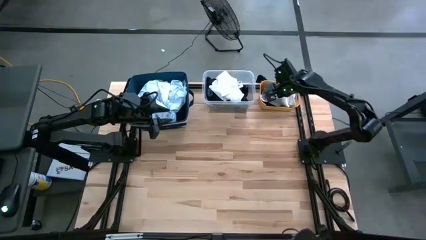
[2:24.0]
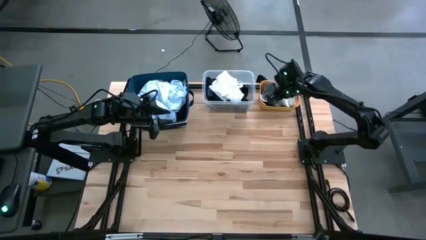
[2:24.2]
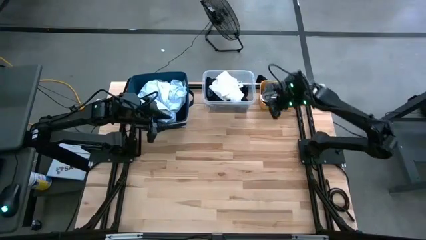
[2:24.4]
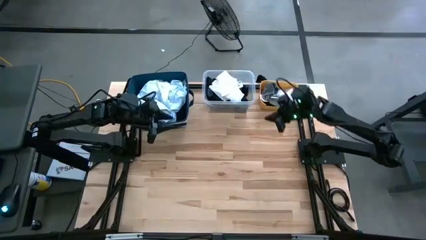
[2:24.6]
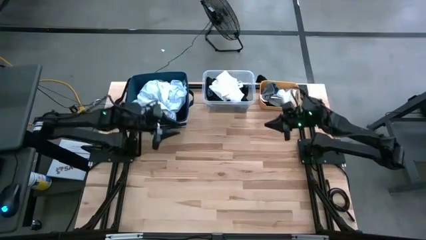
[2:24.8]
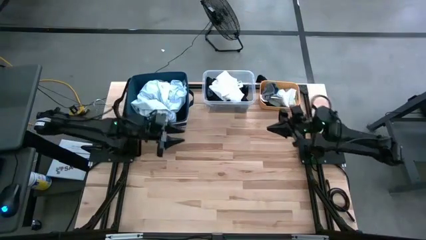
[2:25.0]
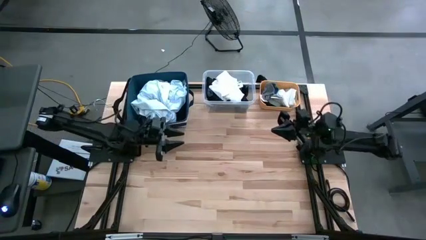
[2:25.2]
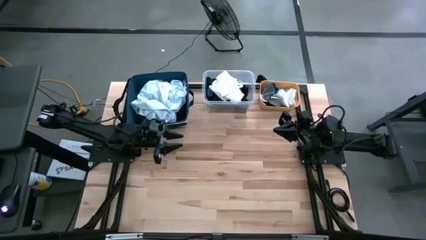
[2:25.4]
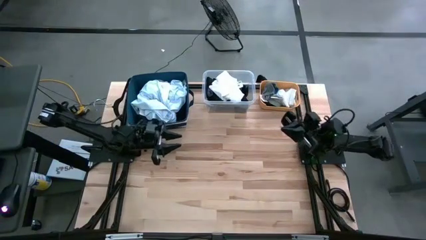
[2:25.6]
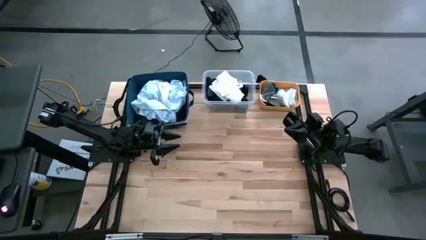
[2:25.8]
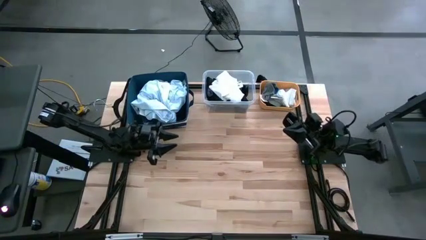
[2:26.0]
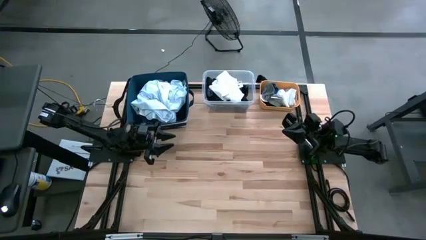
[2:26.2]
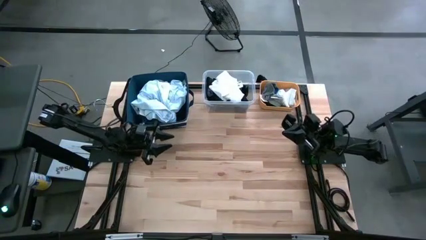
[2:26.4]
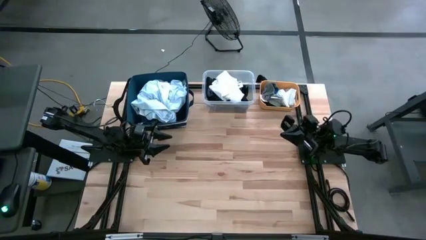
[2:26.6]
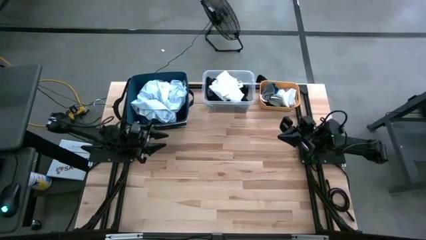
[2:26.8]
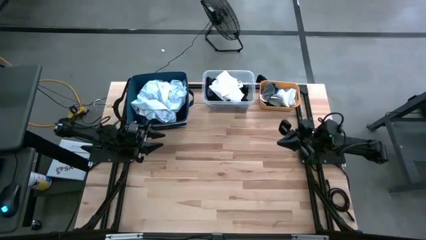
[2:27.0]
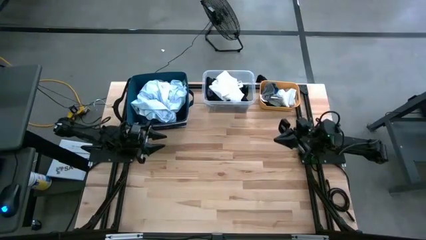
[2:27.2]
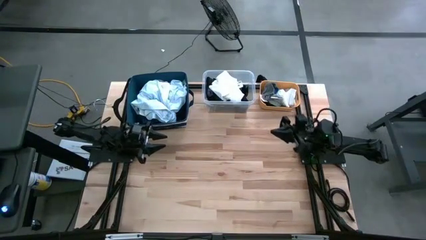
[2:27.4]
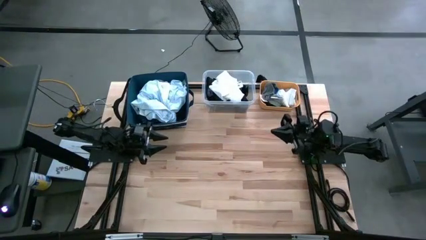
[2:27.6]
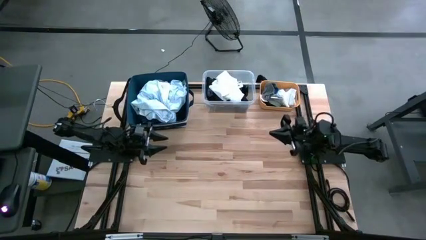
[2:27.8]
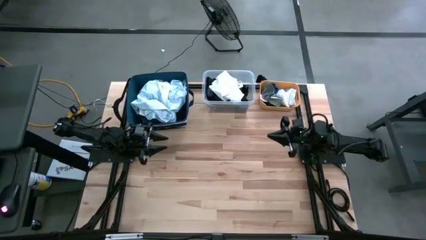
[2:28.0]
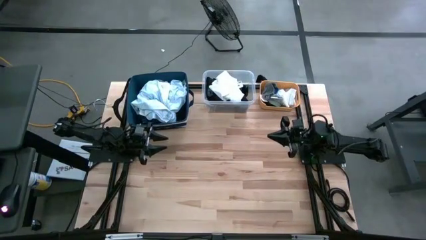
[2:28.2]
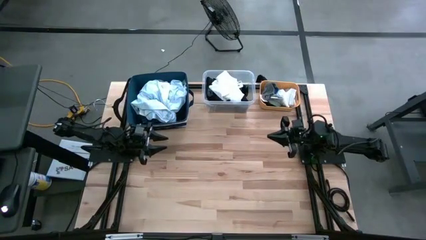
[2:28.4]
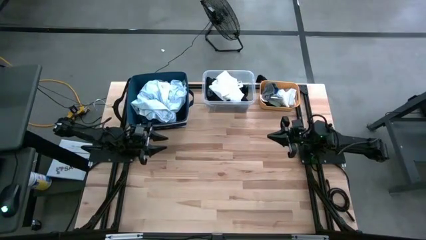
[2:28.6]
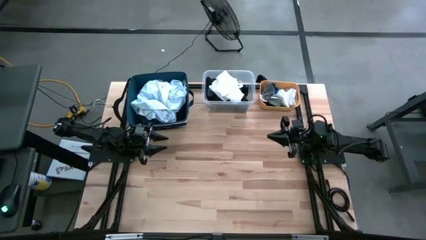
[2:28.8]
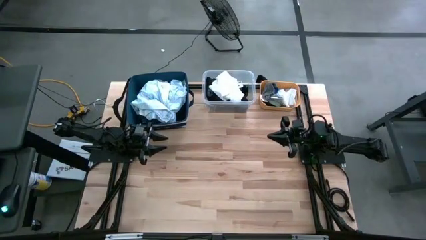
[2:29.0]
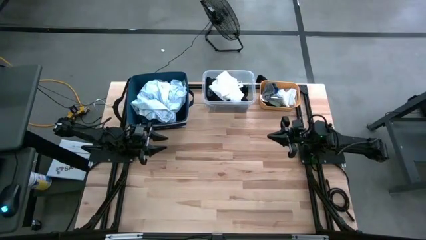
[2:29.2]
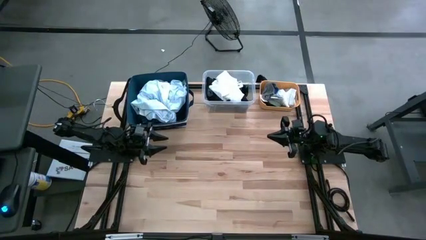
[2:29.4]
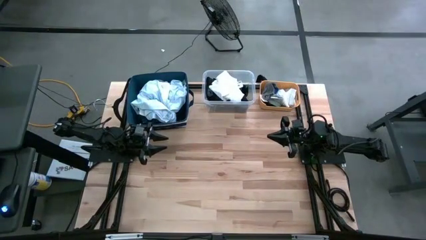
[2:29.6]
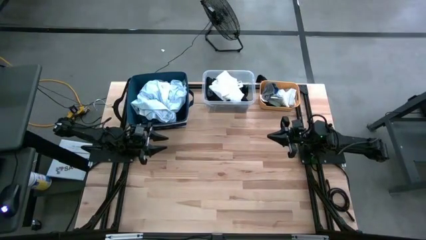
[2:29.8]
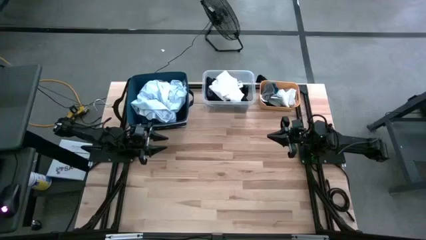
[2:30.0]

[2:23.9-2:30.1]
Task: Pick & Place Cloths
Return to Home Position

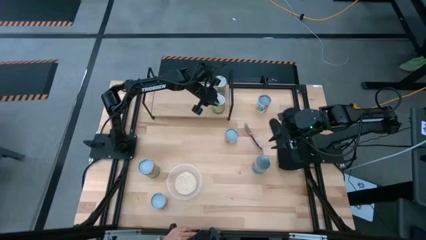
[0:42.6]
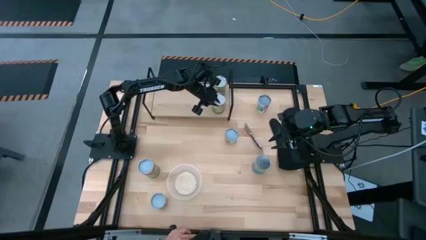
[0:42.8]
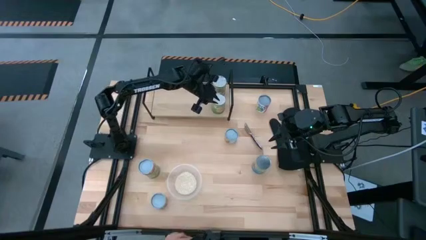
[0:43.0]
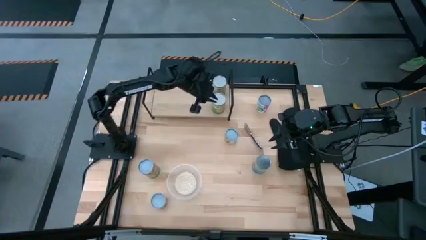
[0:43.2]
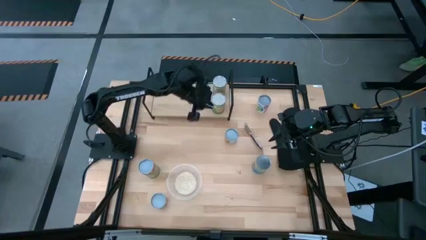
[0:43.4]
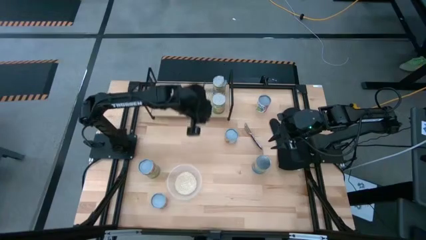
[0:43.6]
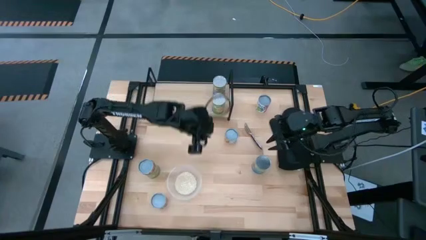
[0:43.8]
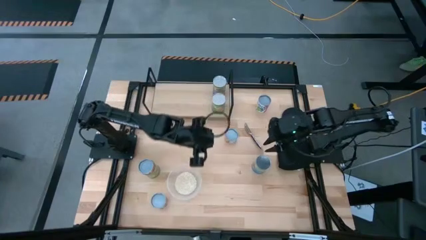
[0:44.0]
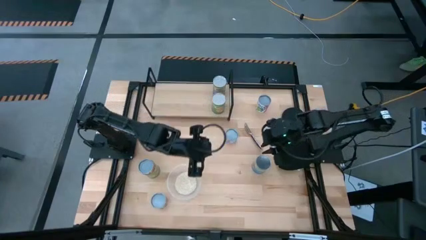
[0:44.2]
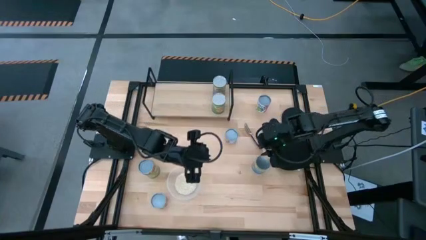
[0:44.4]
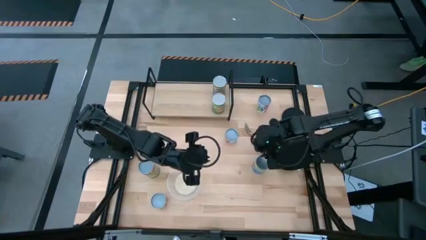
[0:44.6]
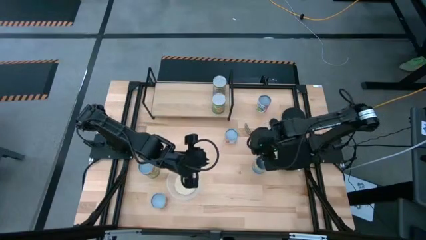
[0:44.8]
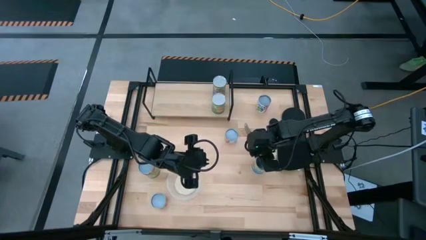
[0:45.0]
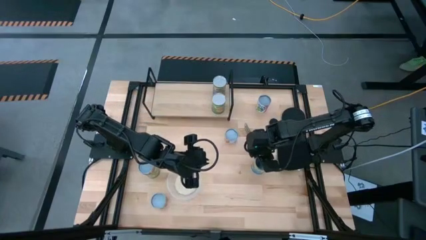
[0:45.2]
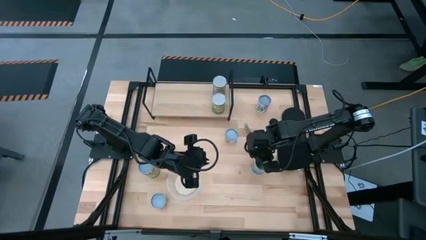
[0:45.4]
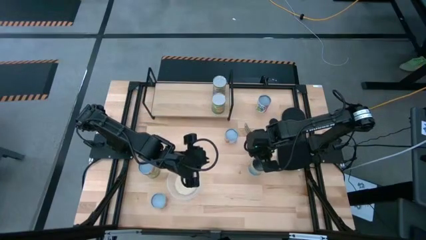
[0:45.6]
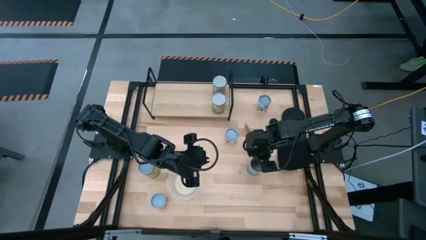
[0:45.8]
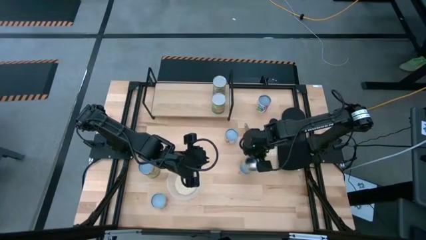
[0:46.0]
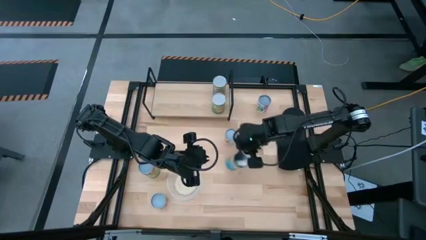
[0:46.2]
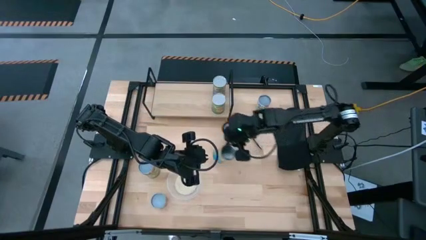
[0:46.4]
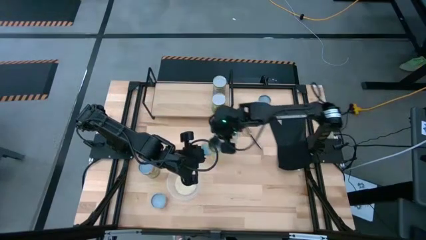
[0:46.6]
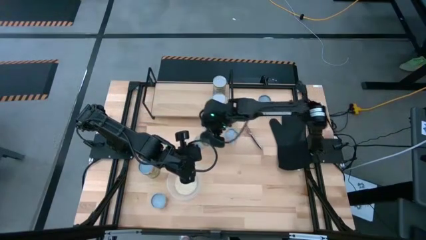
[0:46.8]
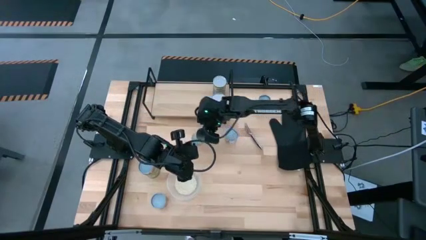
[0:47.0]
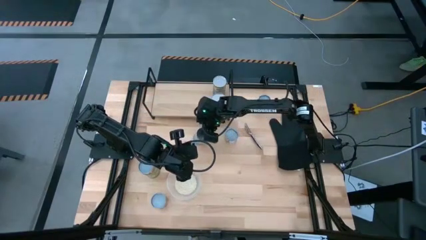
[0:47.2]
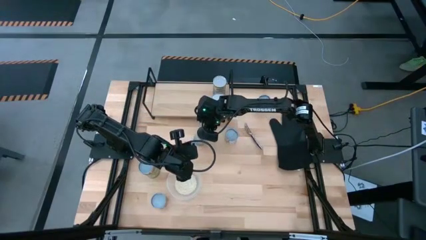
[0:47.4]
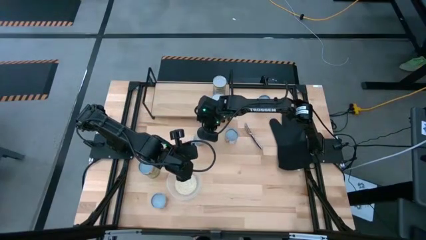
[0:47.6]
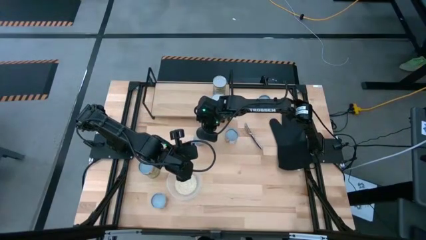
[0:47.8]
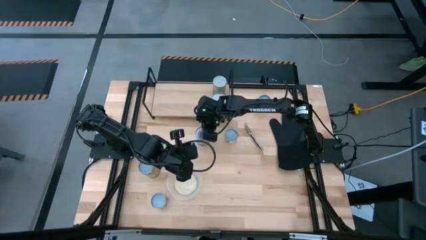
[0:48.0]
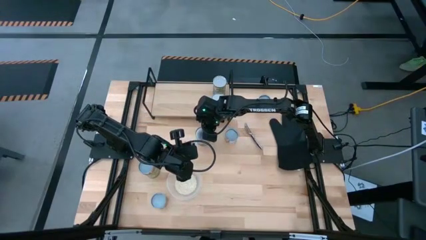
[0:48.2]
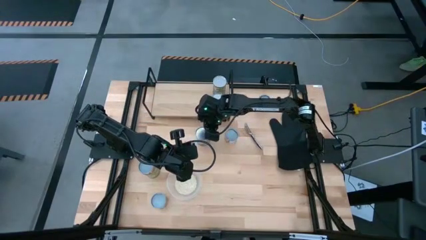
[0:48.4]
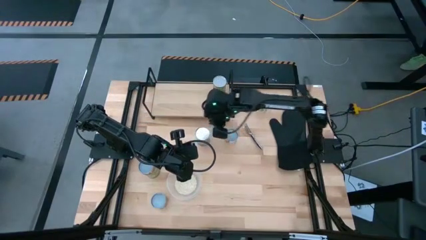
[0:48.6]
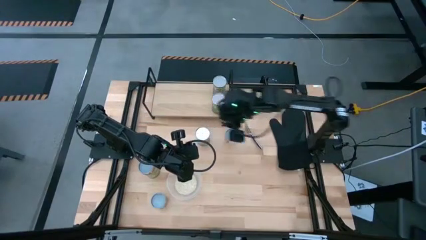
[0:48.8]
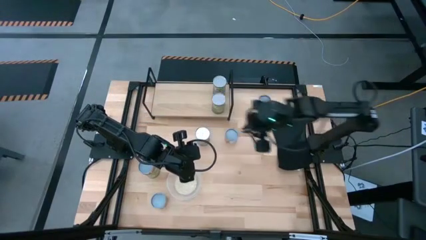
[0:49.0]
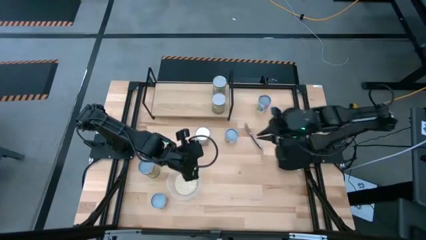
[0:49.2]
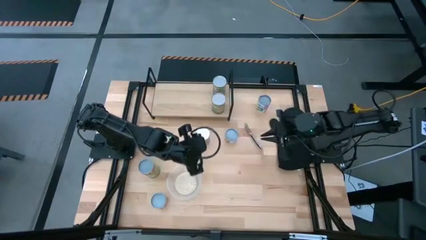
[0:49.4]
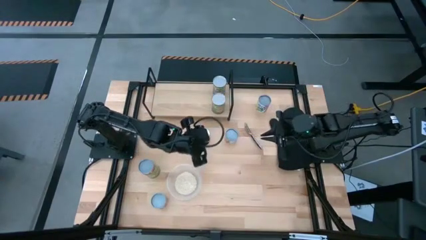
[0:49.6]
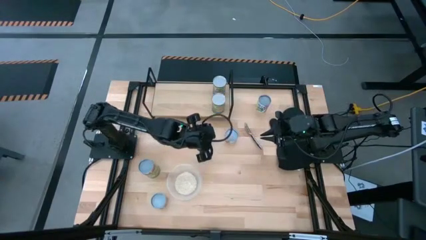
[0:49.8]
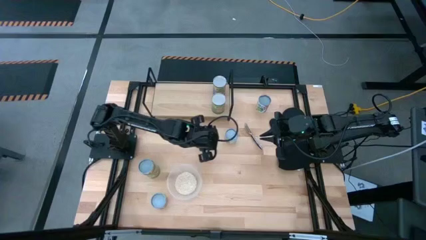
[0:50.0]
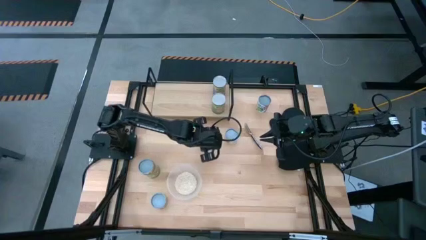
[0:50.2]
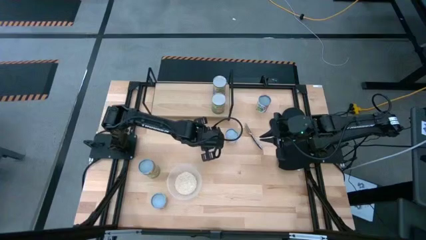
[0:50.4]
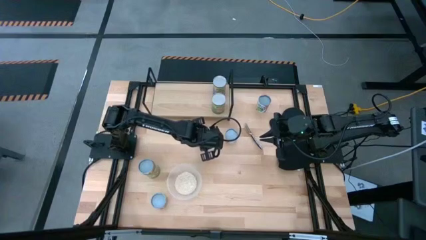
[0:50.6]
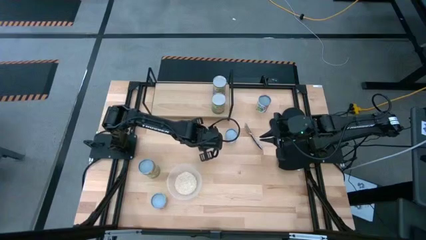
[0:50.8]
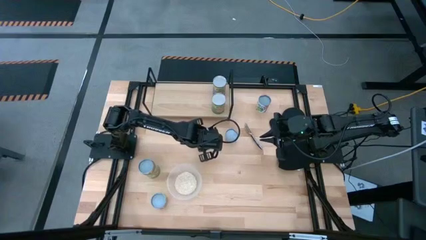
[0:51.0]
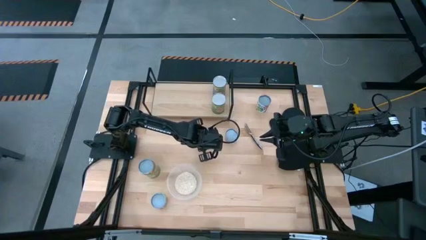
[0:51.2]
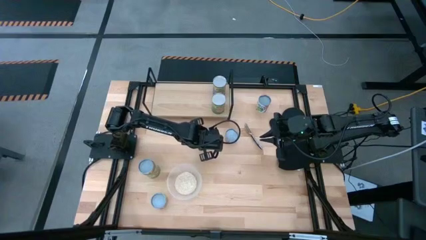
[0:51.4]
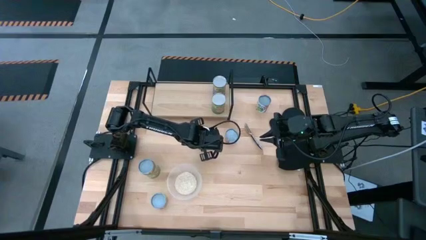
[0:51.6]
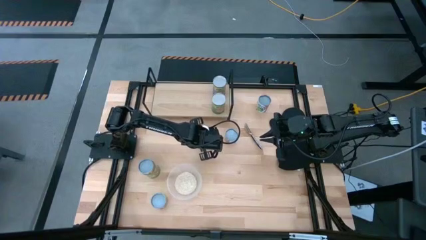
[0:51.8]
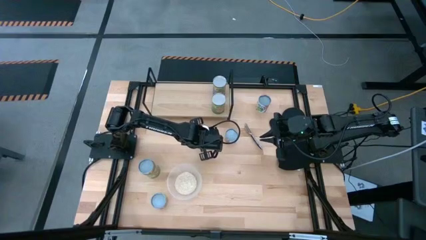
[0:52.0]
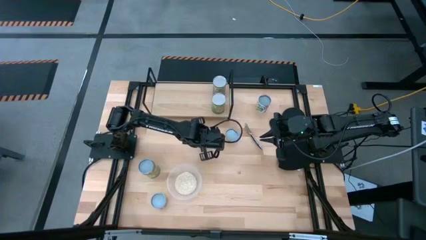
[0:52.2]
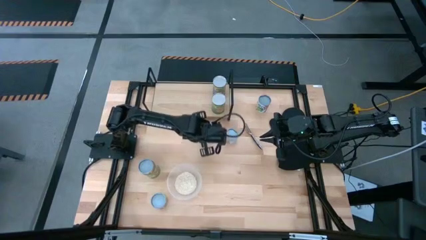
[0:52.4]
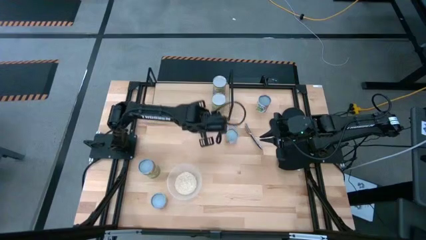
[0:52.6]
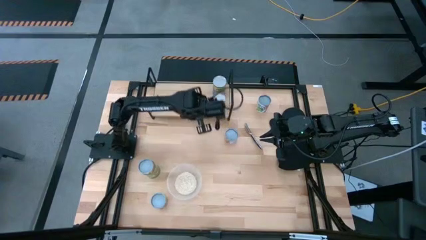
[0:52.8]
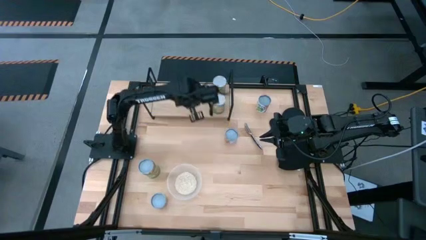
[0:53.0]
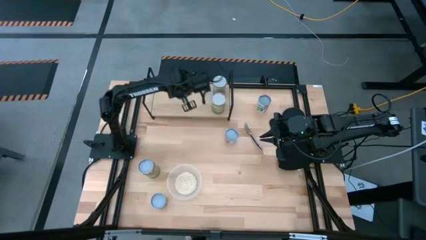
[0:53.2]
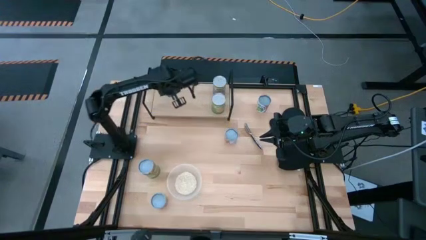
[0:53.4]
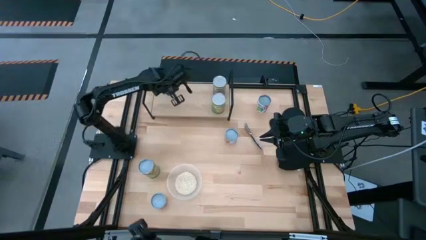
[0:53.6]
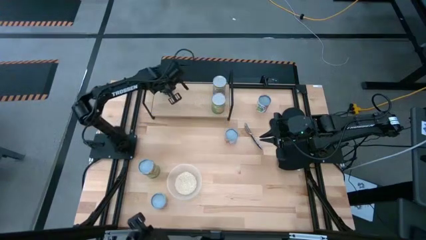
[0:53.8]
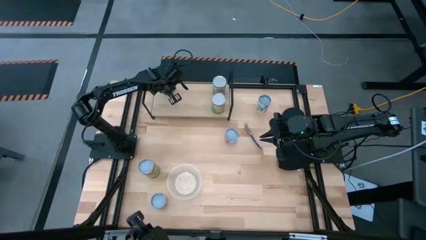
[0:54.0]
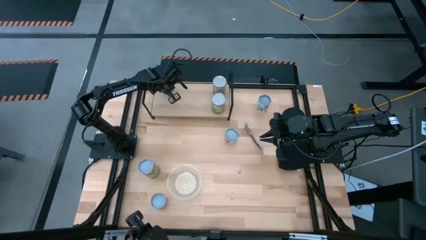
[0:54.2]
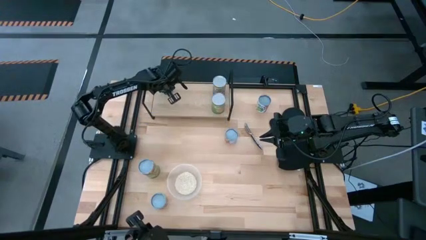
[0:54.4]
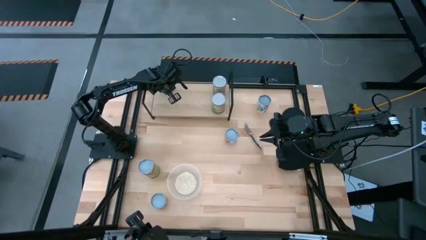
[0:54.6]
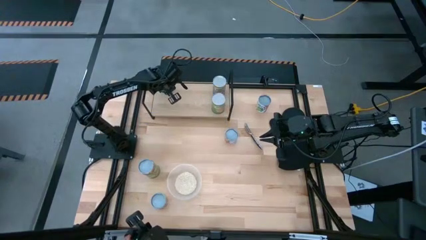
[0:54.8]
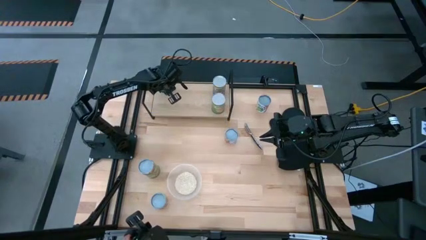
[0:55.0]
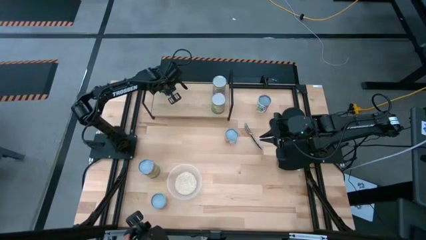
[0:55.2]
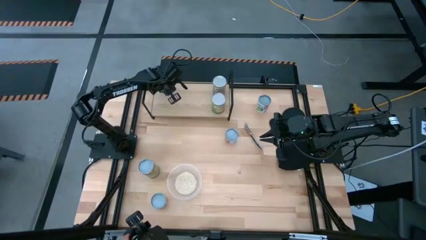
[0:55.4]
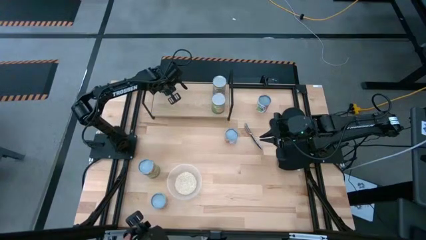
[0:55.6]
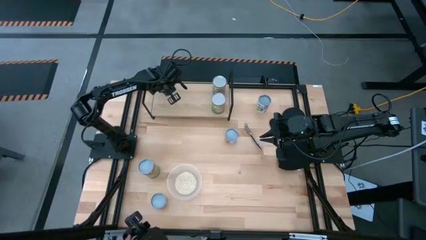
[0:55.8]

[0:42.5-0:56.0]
Task: Pick and place cans onto a shelf
Put the canned tomatoes on the shelf
